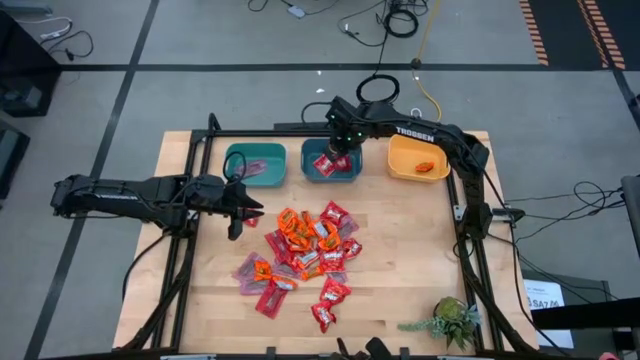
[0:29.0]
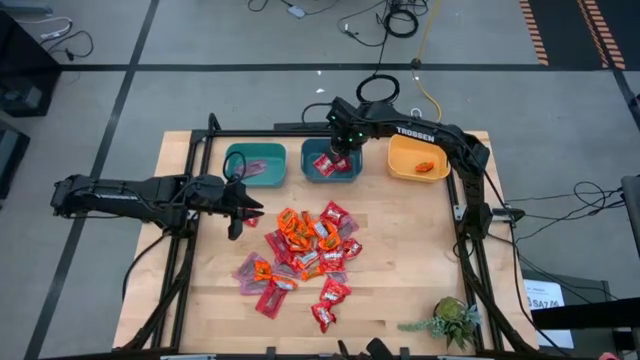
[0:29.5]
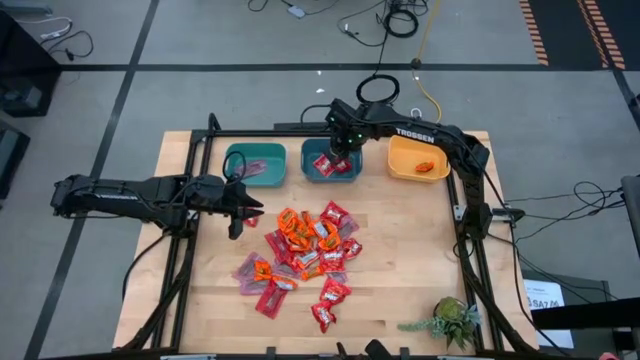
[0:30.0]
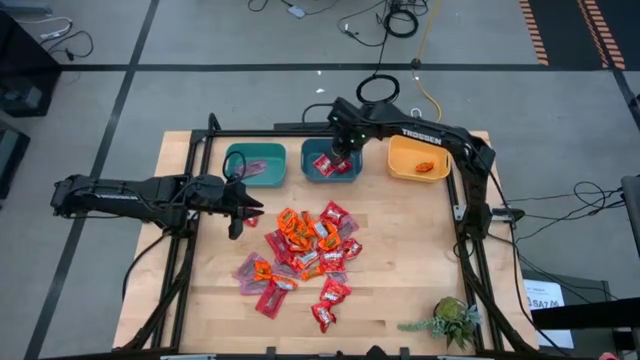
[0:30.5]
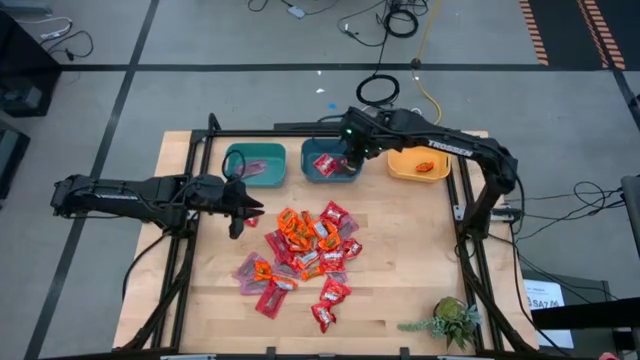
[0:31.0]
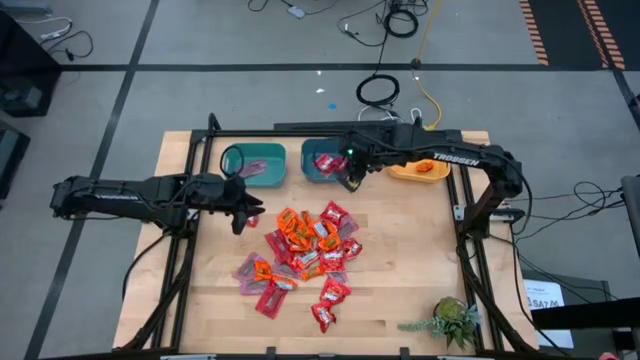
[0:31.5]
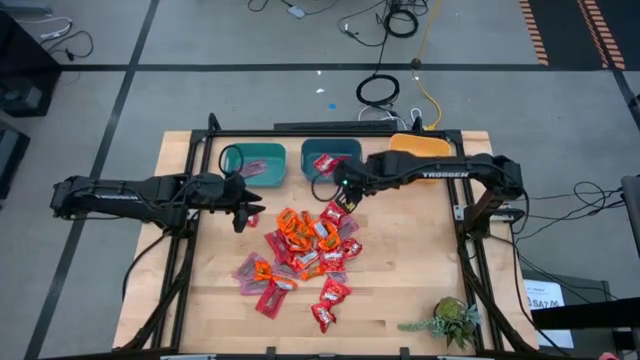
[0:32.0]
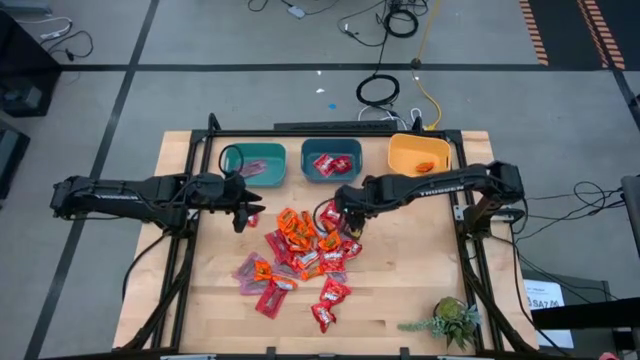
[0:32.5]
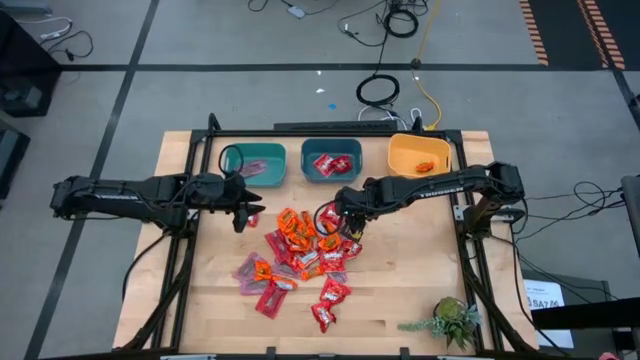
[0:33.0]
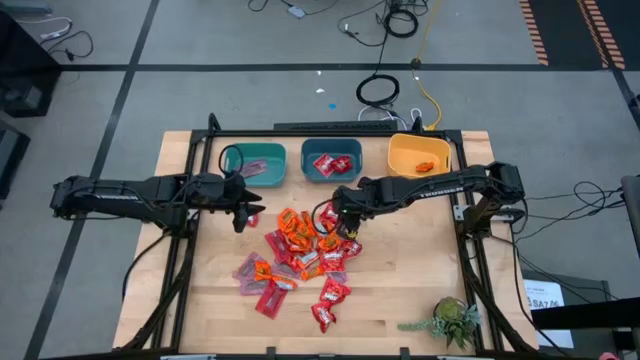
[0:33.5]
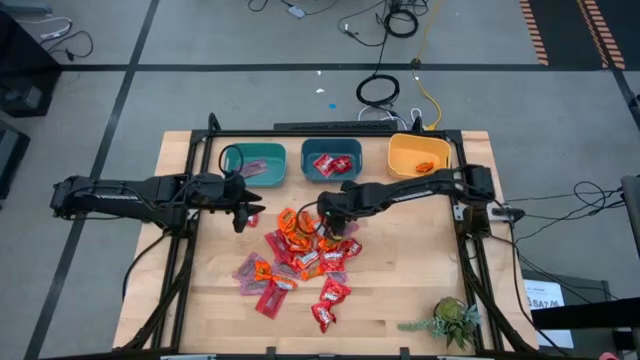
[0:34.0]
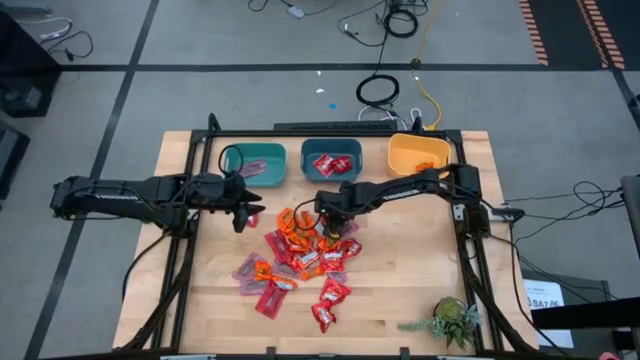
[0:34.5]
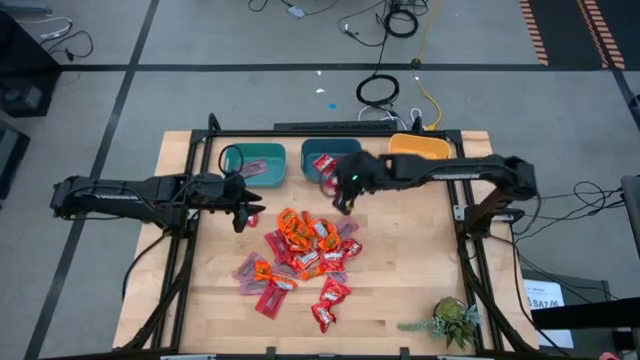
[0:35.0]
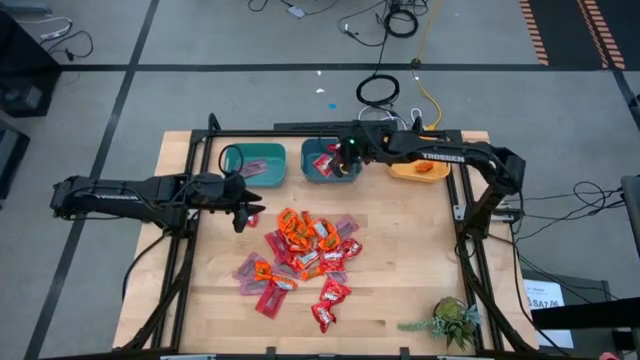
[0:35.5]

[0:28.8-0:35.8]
Task: Sort candy
Put the red candy into the blue bin

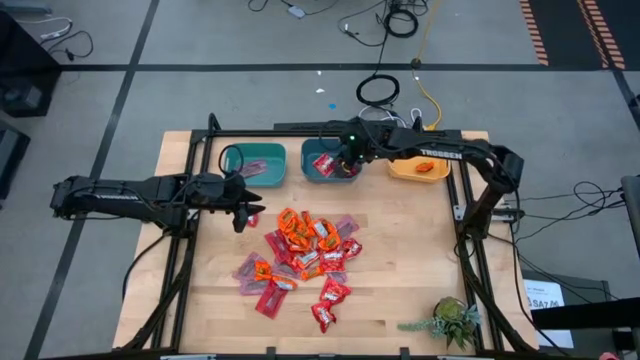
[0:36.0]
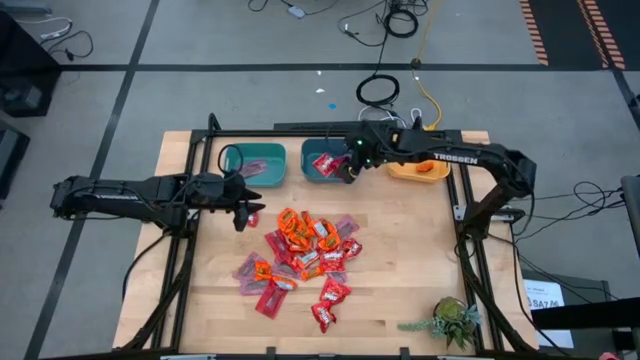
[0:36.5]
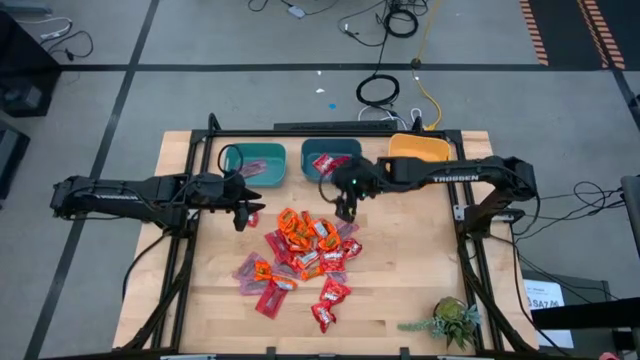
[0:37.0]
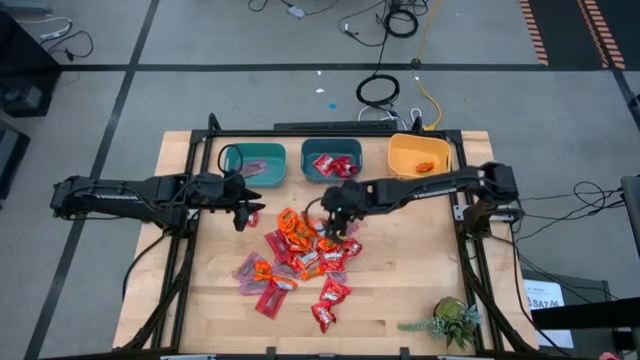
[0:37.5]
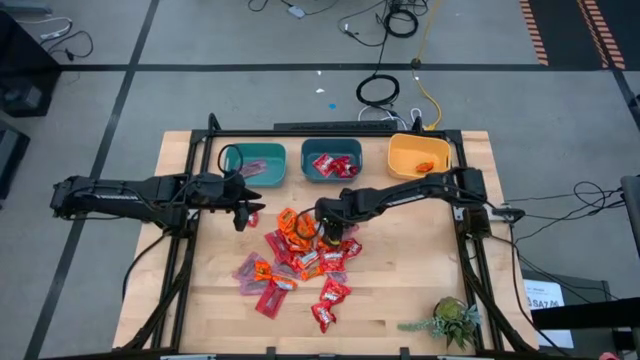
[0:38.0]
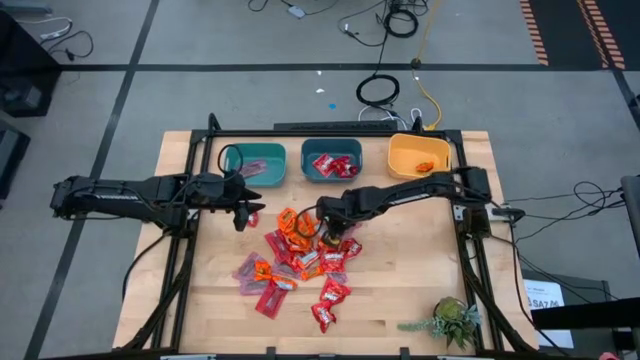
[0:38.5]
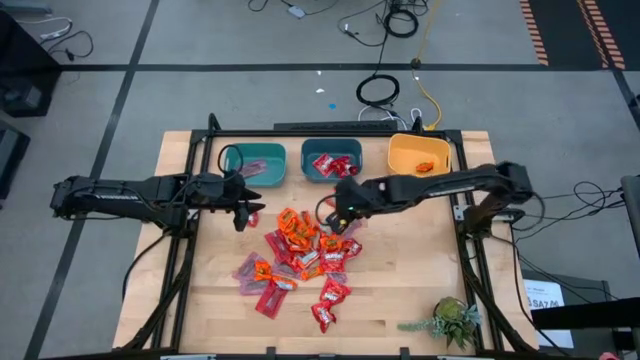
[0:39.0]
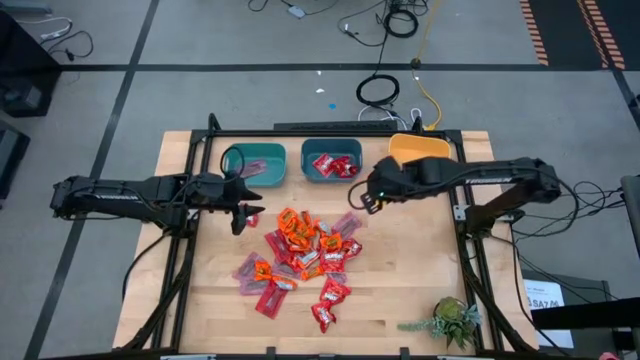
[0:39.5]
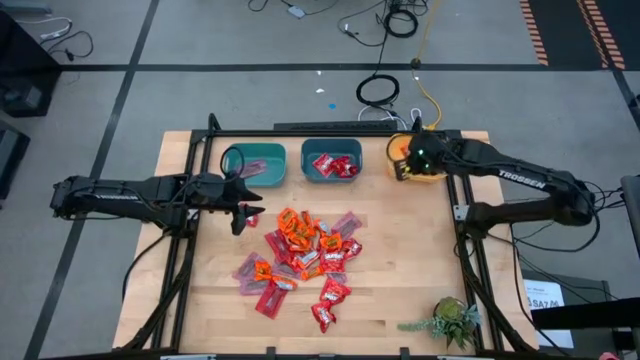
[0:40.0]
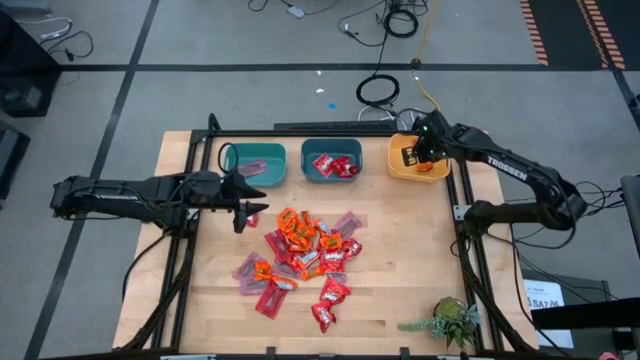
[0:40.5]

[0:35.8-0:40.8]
Put the orange chocolate into the yellow bin

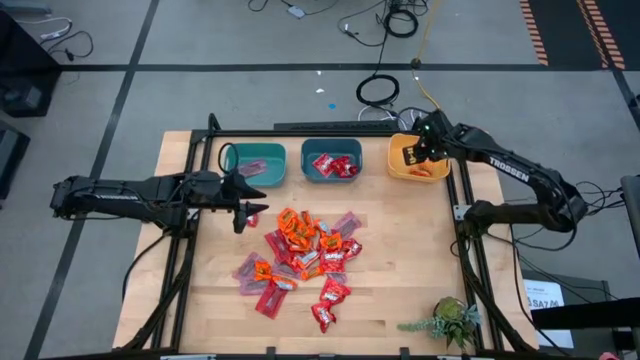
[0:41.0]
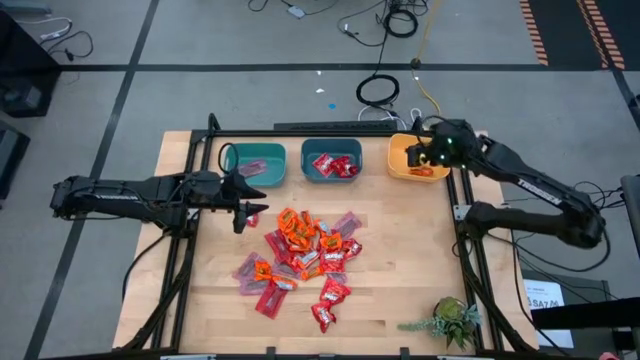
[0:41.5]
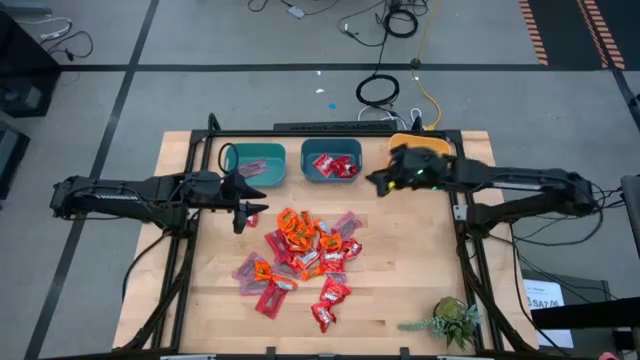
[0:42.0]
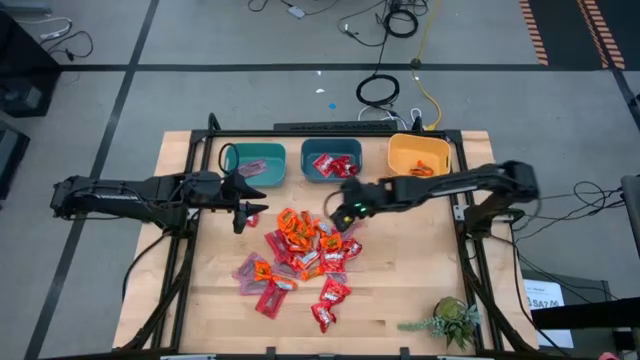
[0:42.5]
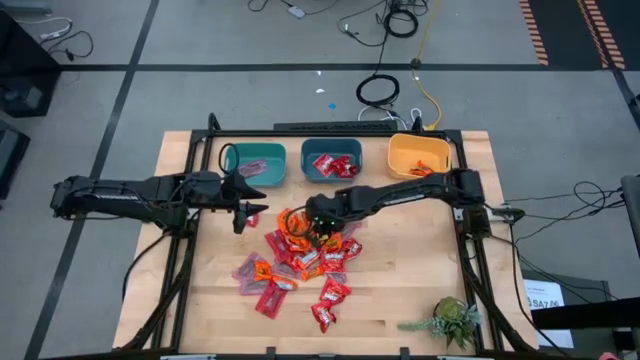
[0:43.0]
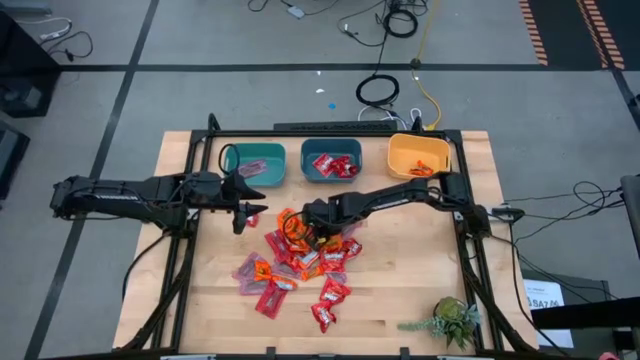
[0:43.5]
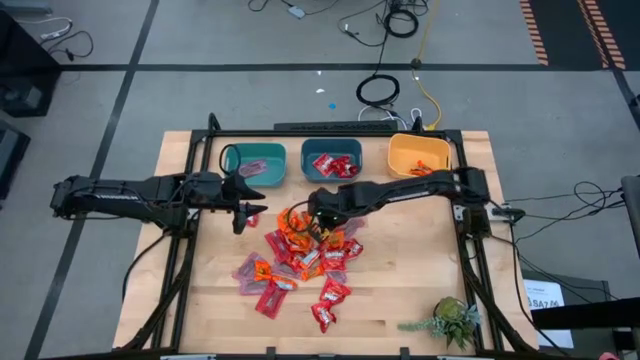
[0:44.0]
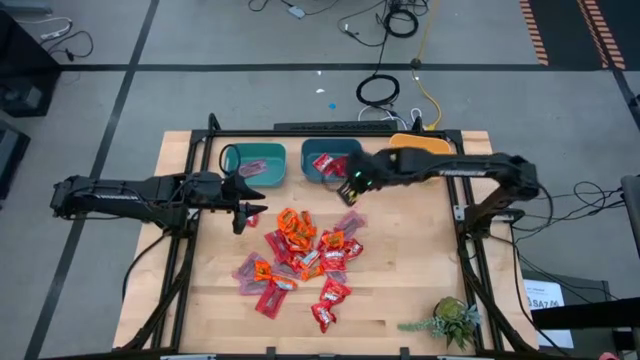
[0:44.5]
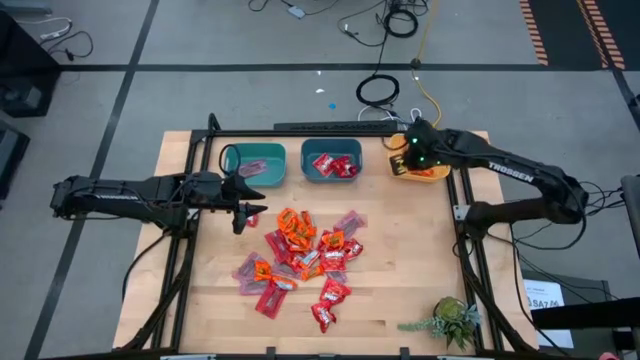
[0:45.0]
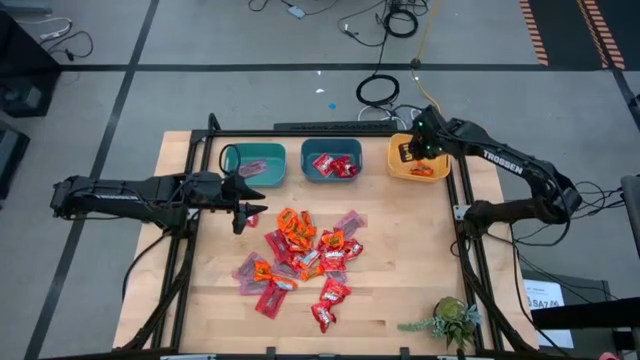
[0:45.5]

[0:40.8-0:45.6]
Put the orange chocolate into the yellow bin

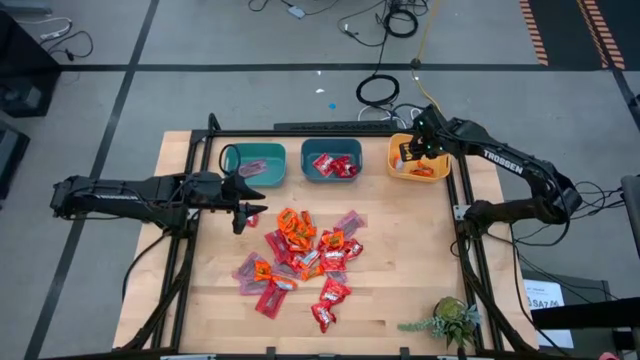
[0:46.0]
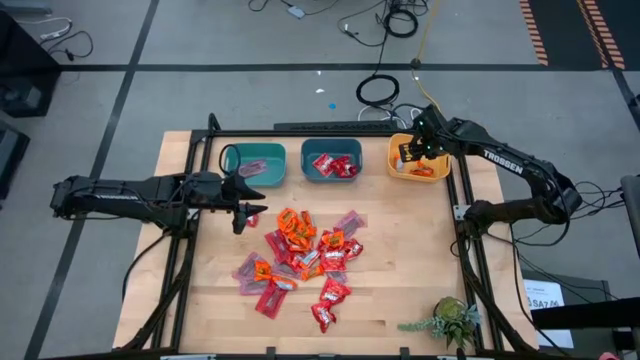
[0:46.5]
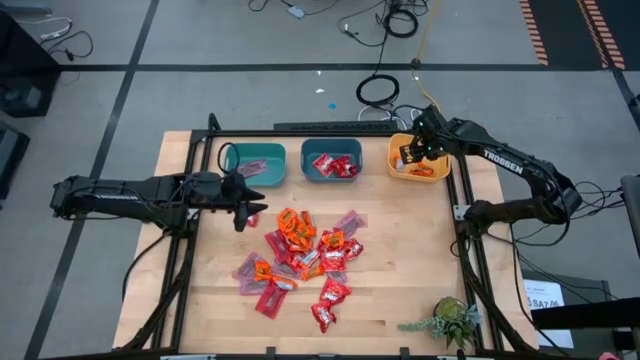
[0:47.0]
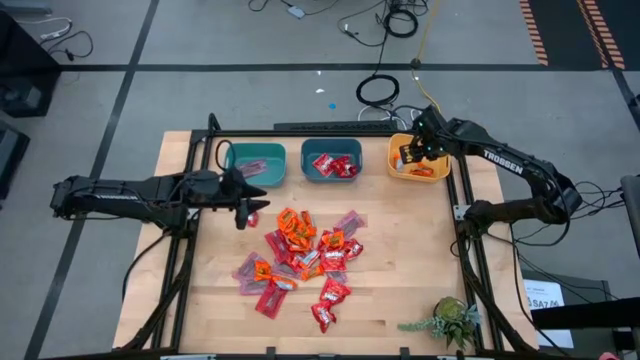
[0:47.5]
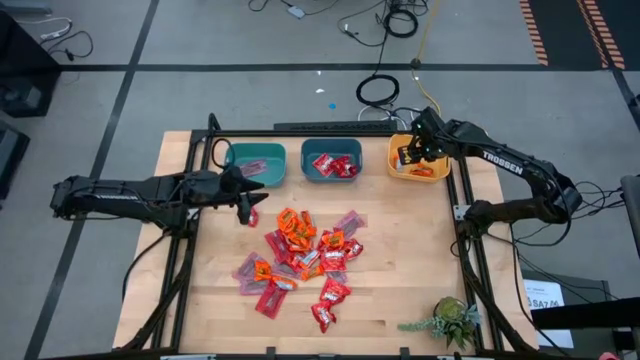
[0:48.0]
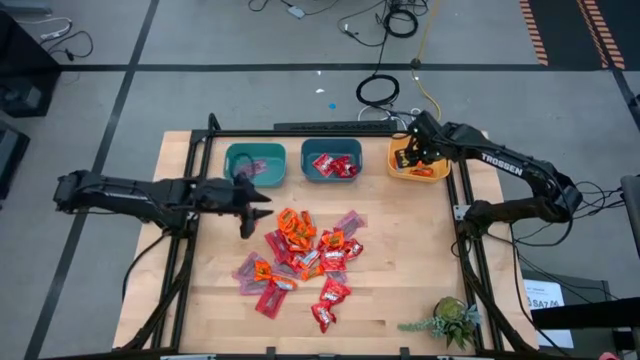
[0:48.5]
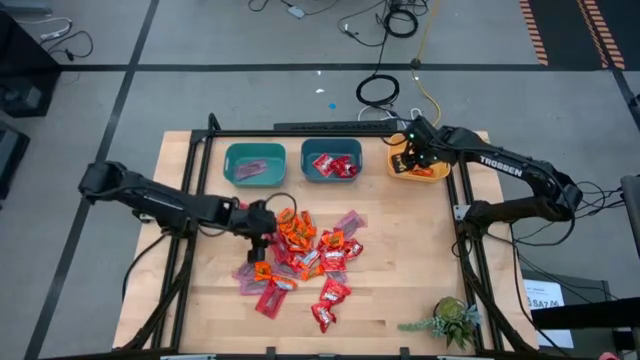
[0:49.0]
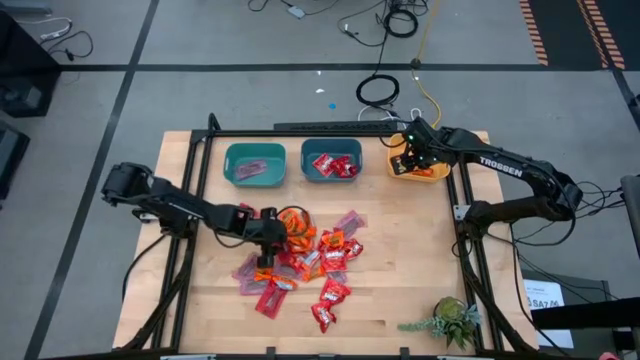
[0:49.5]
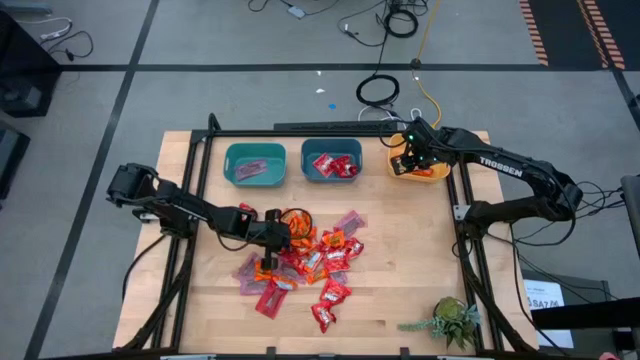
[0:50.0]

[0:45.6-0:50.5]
Put the red chocolate into the green bin

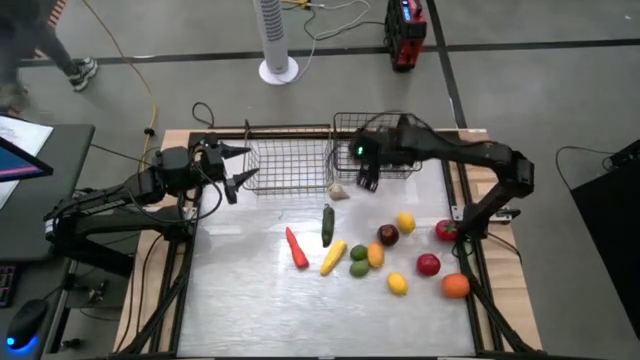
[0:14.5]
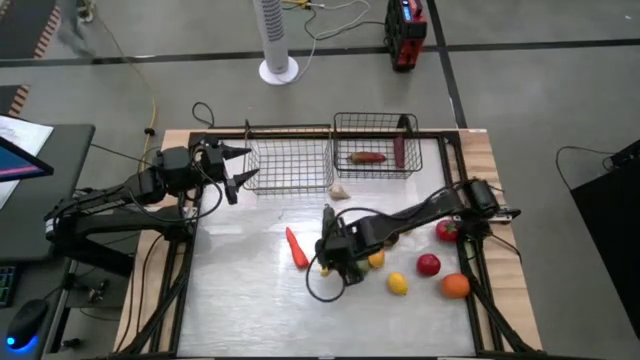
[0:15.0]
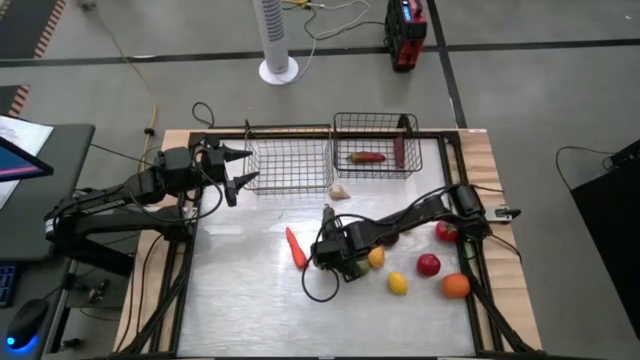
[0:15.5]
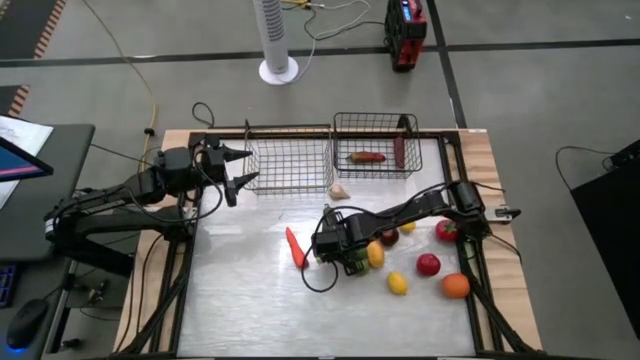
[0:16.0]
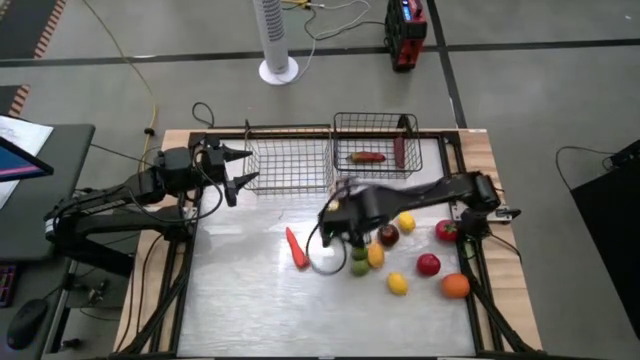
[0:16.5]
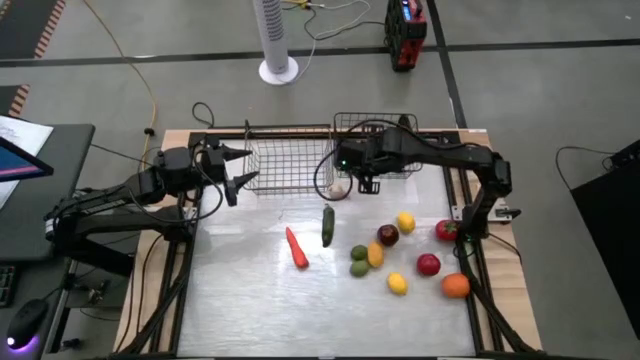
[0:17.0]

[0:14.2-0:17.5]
Task: Sort produce into baskets
Put the corn into the right wire basket
